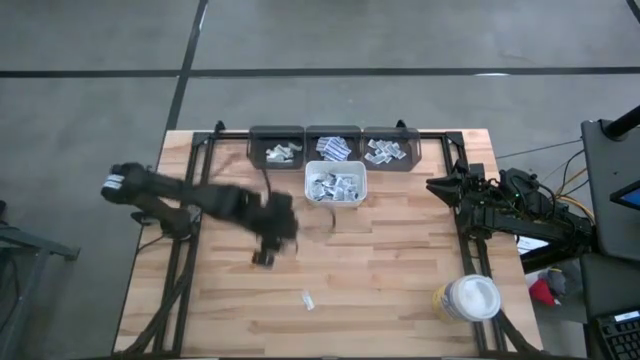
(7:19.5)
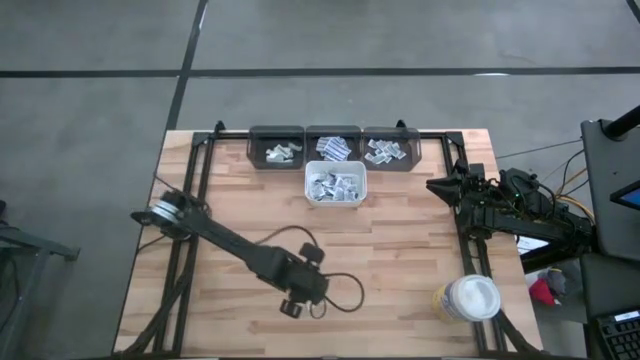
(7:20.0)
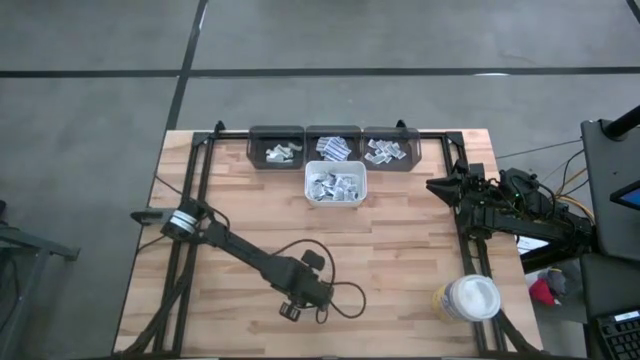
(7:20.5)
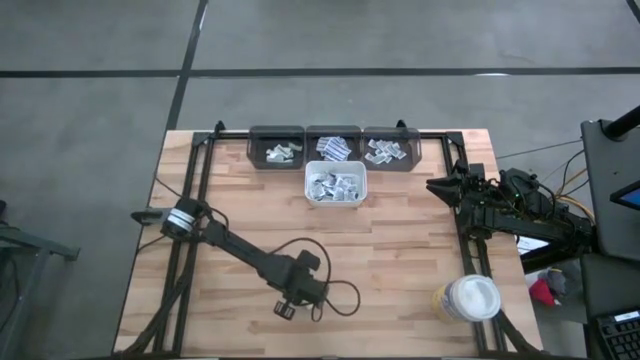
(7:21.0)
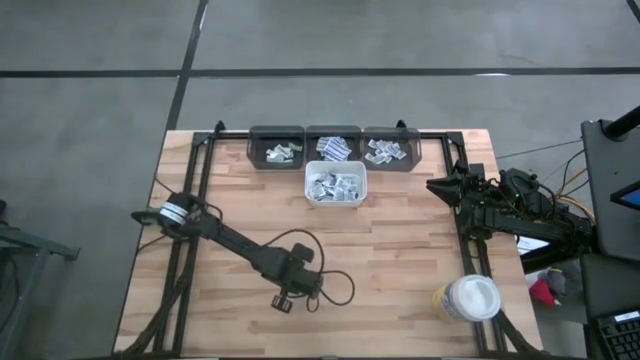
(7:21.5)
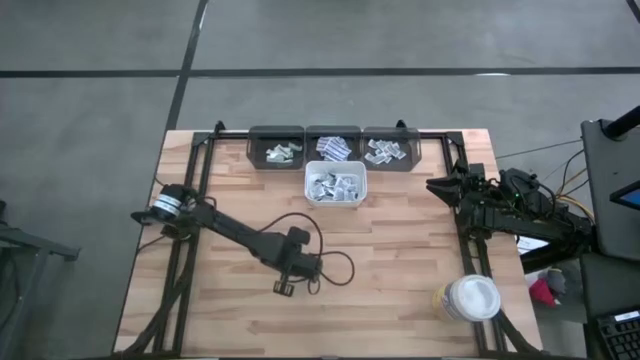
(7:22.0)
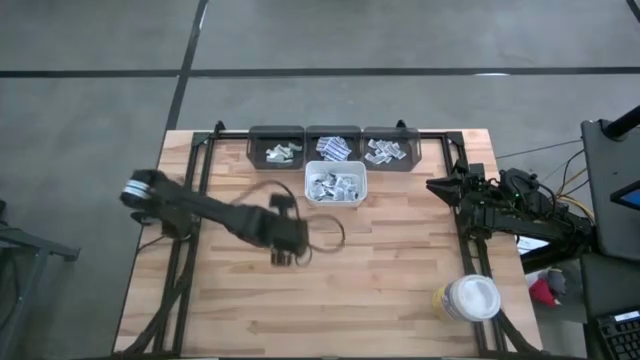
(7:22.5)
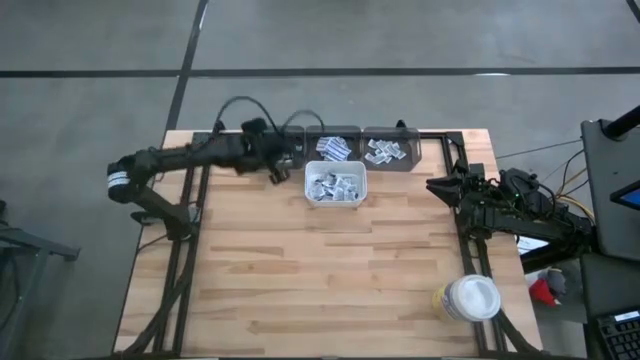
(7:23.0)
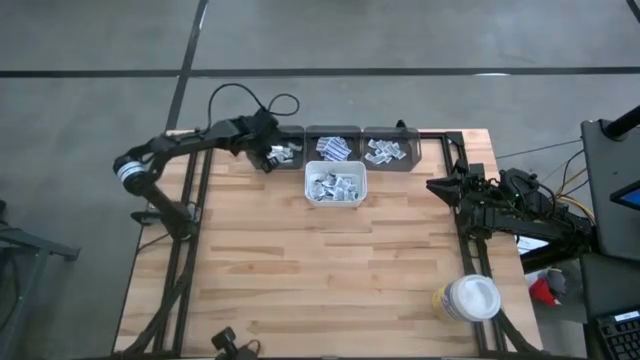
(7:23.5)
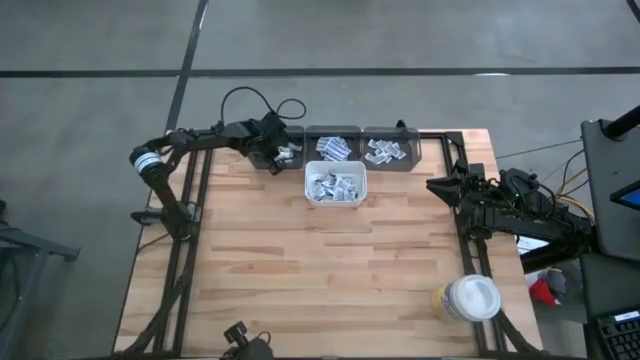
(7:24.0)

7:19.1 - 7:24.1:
Task: Pick & Place First Aid Supplies
Put the green bandage into the left black bin

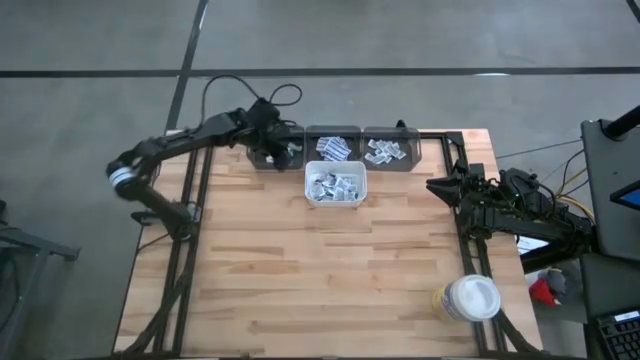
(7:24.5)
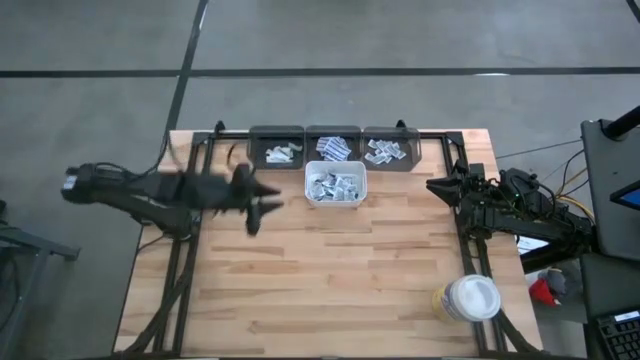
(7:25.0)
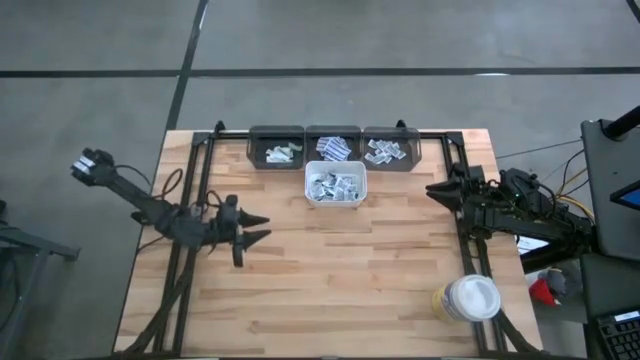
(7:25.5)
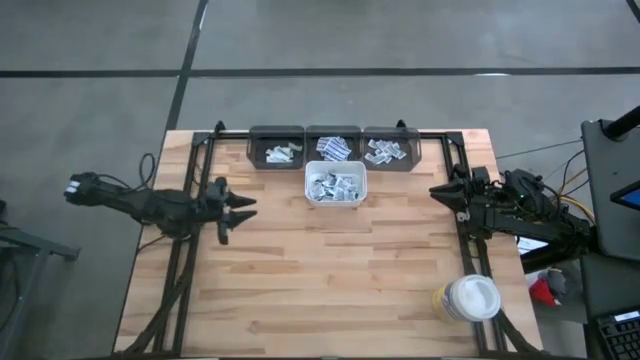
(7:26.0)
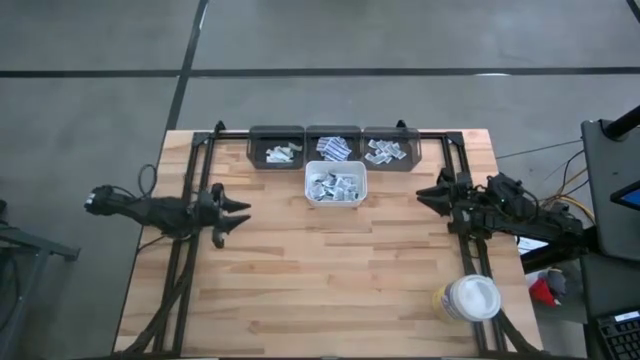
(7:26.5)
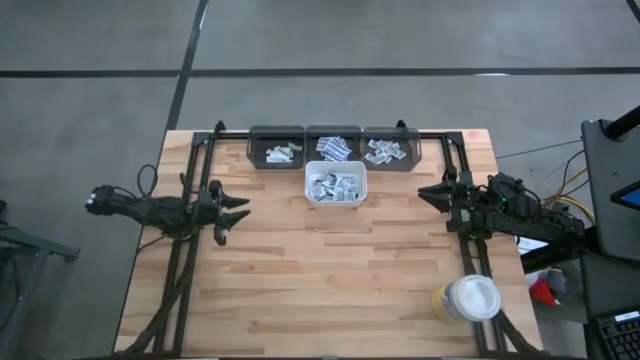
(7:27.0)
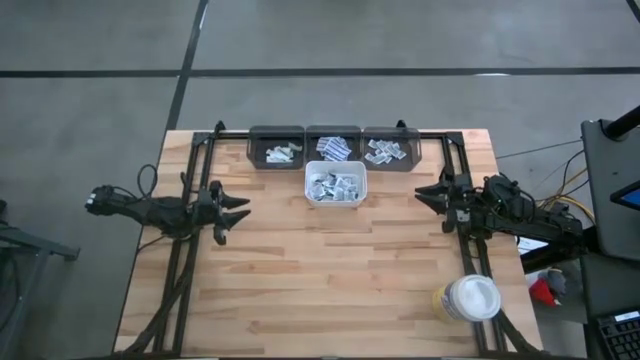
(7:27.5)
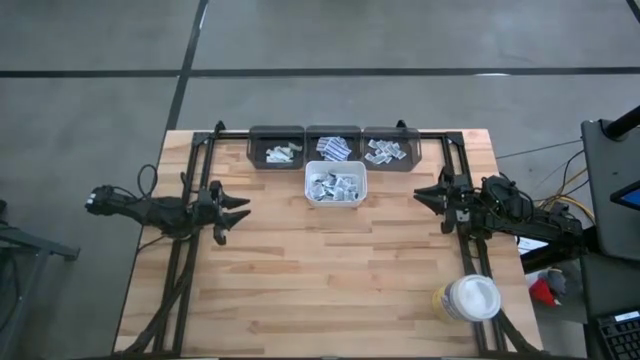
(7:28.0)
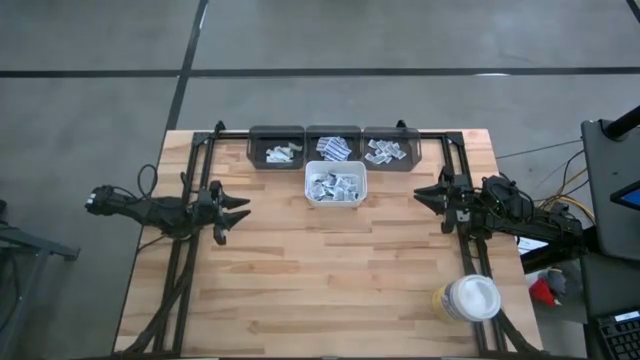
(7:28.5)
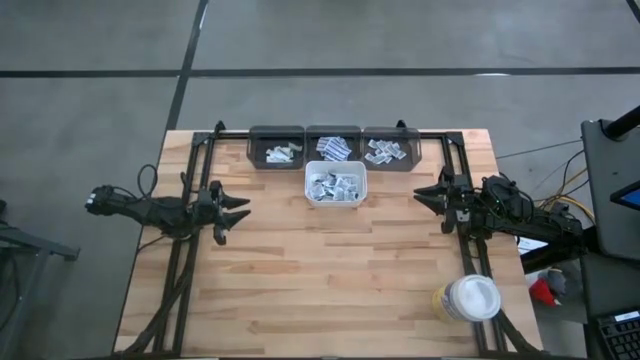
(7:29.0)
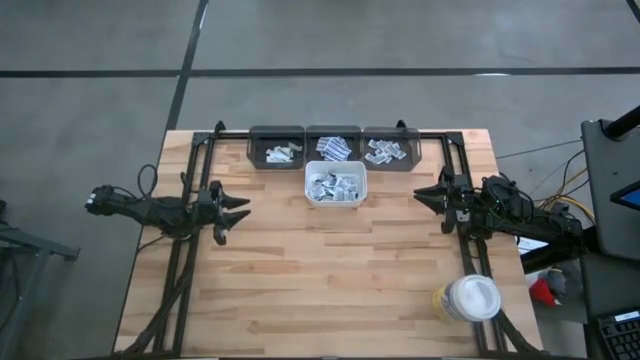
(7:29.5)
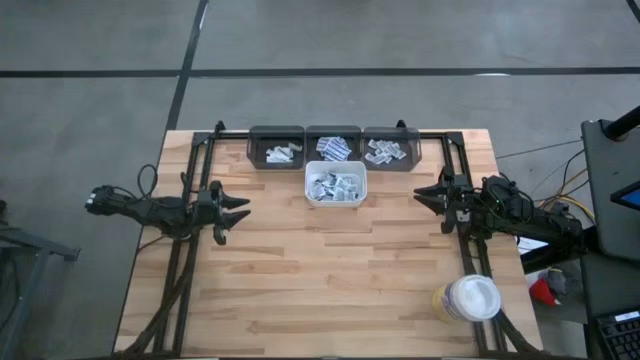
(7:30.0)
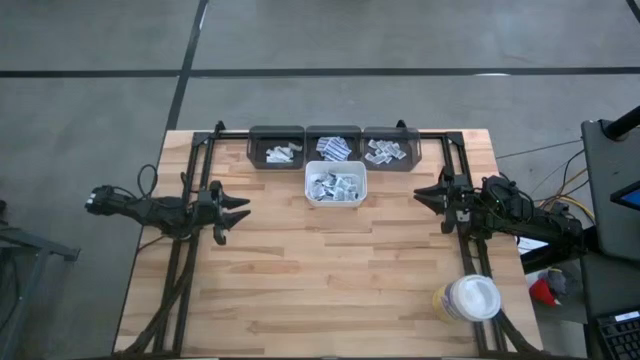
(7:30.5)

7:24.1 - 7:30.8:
Return to Home Position

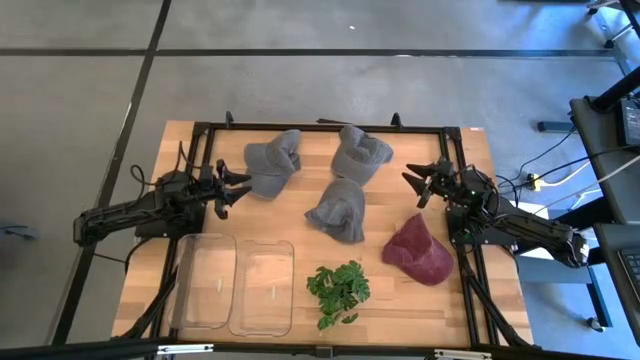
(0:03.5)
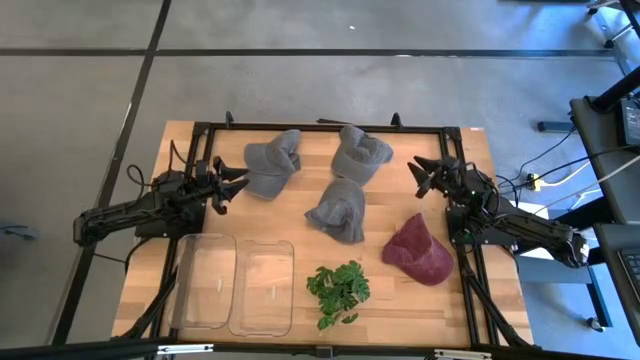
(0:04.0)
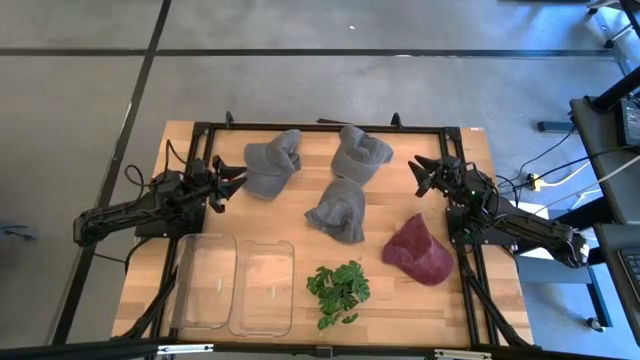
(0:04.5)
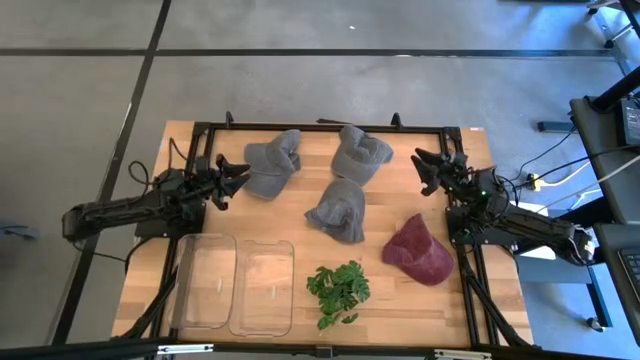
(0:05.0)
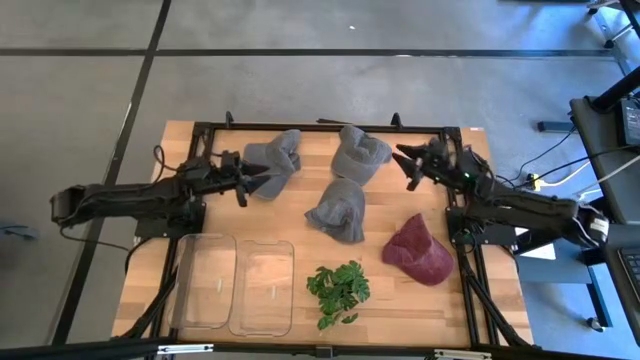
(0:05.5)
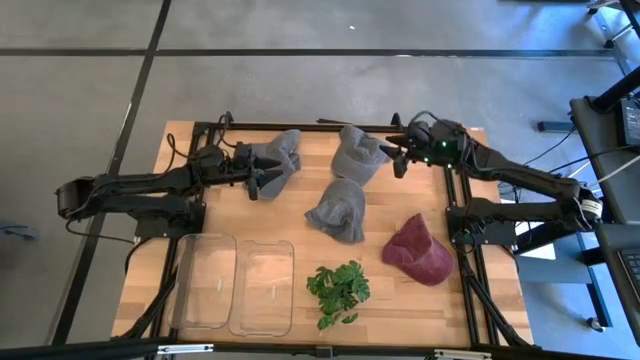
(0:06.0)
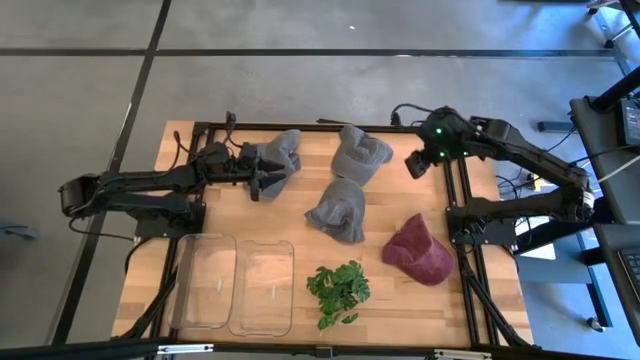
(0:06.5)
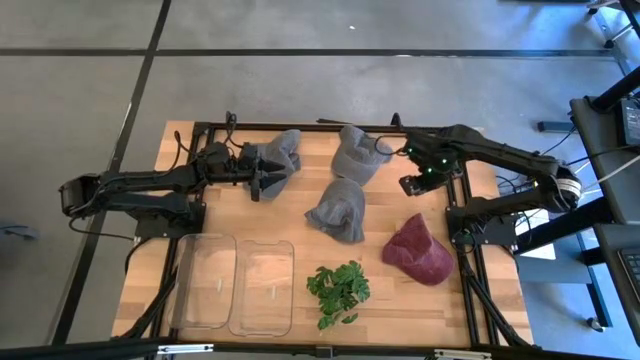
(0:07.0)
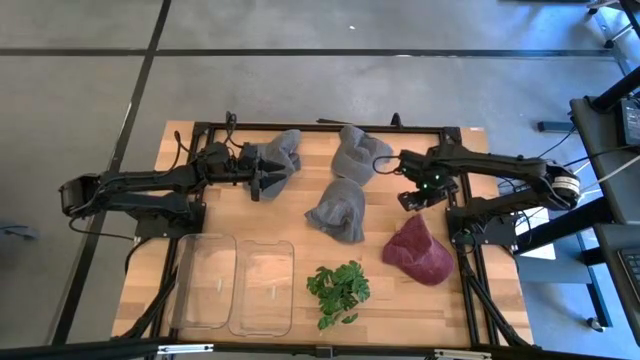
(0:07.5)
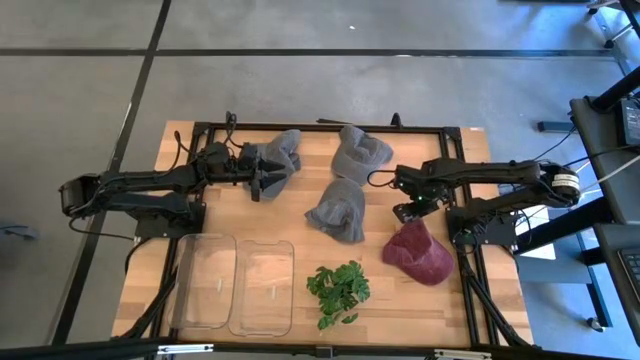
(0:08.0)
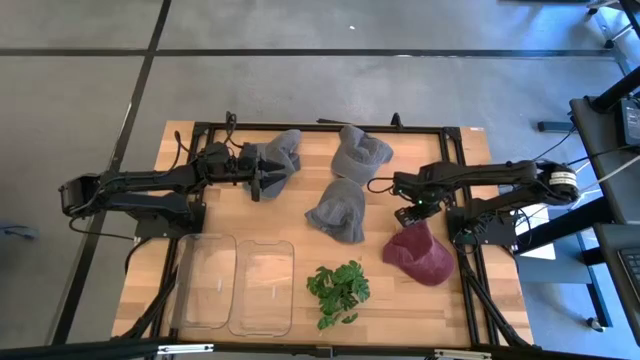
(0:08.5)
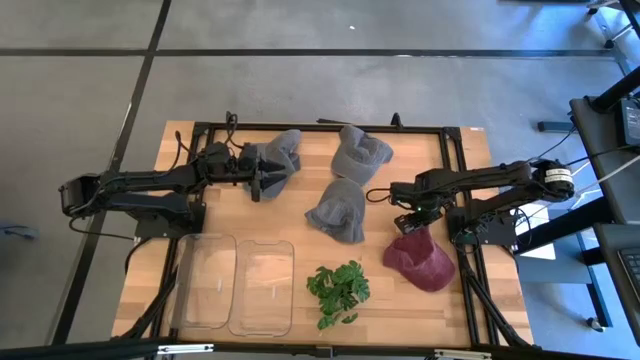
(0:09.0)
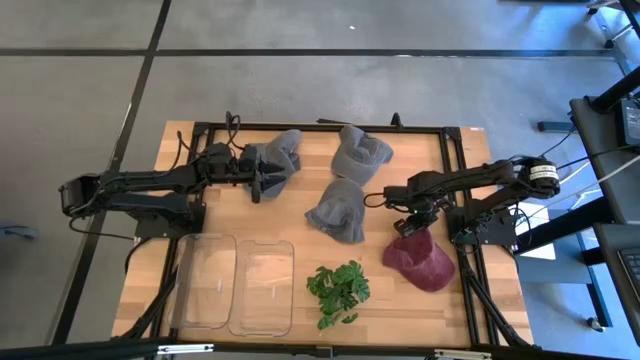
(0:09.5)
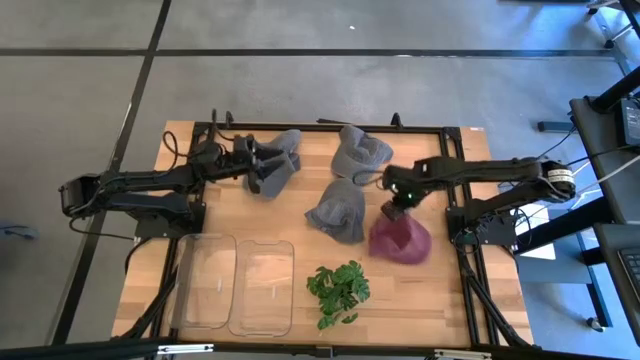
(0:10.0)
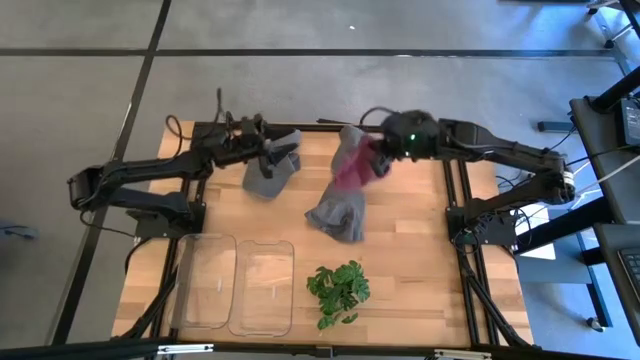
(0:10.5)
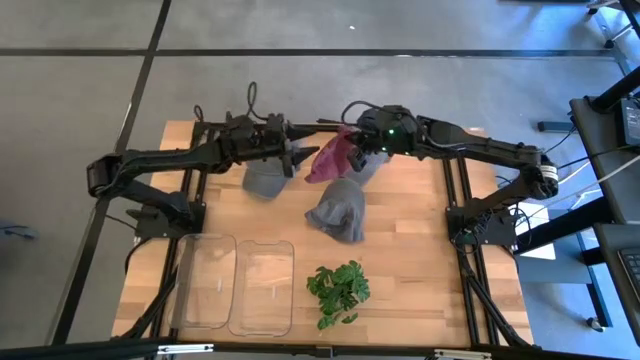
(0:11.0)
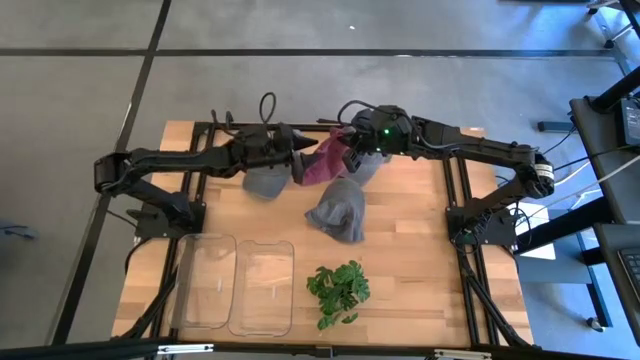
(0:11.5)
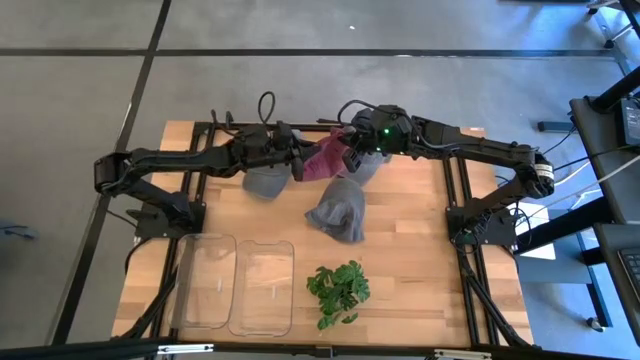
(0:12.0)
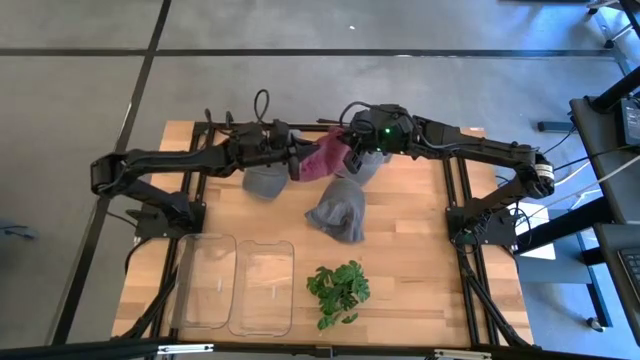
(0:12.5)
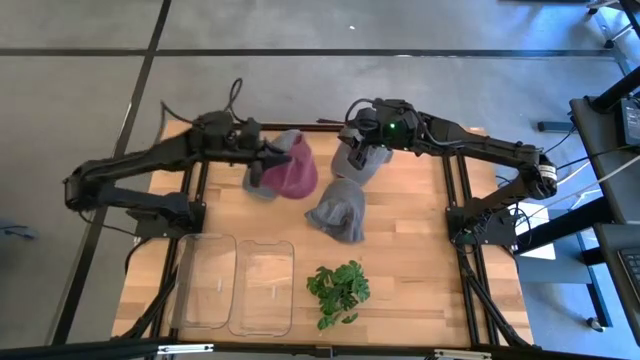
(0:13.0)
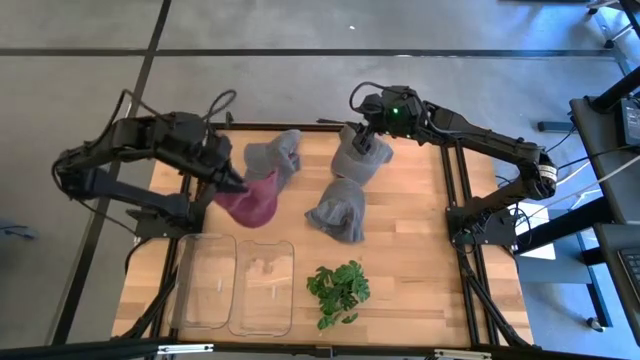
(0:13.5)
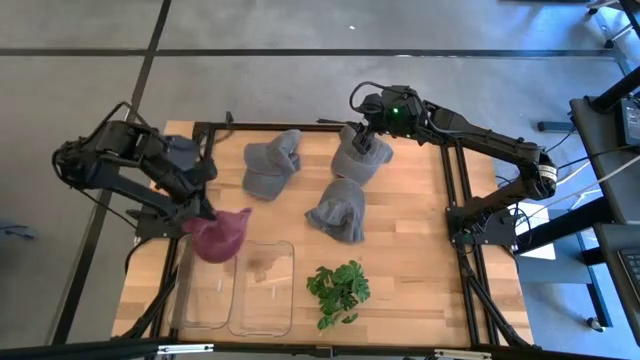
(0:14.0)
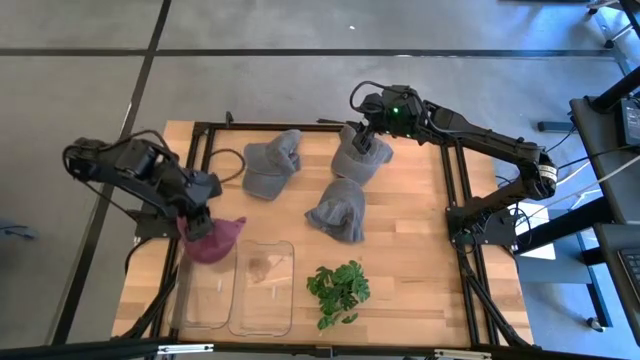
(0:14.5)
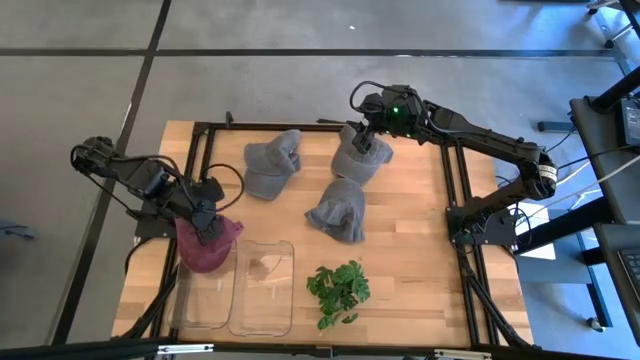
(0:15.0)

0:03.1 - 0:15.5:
Task: Pick & Place hat
Put the red cap into the left transparent bin
